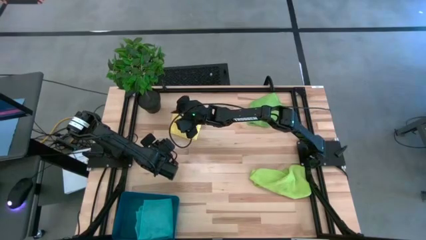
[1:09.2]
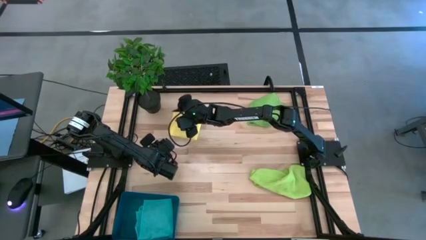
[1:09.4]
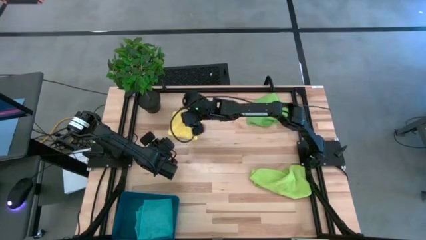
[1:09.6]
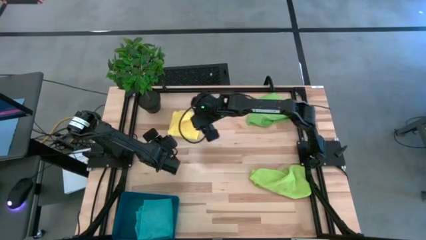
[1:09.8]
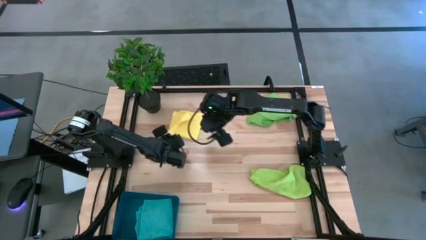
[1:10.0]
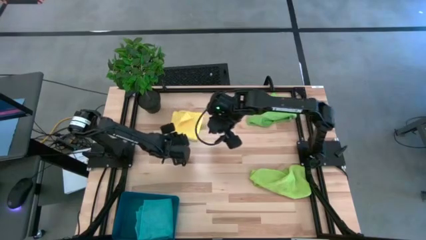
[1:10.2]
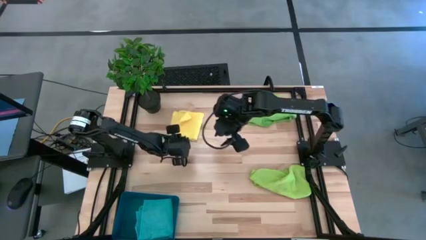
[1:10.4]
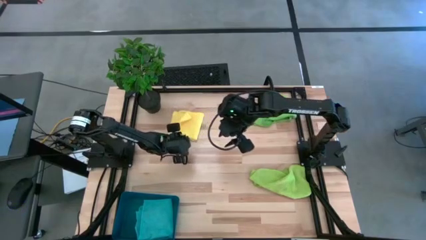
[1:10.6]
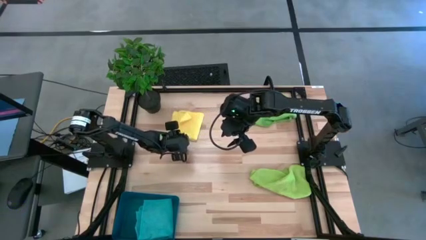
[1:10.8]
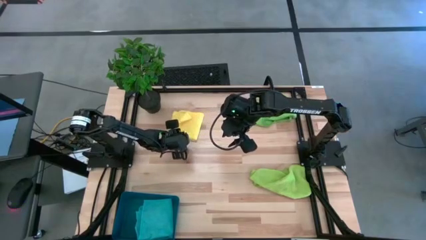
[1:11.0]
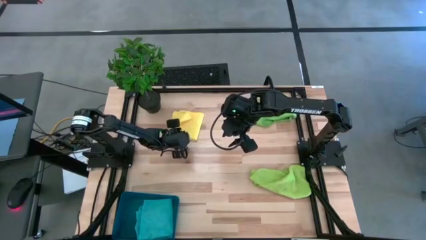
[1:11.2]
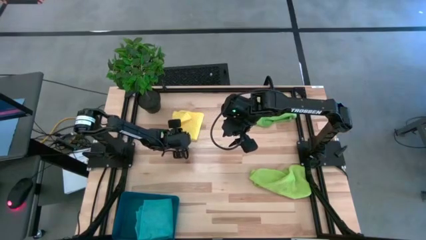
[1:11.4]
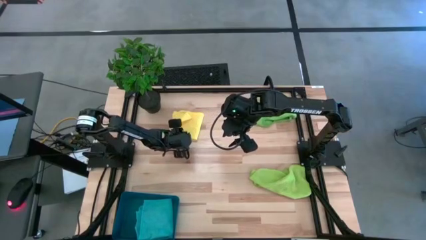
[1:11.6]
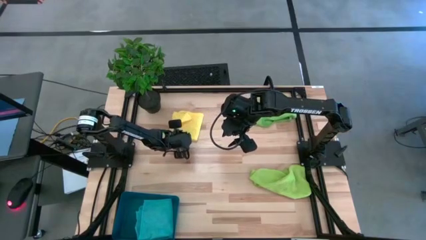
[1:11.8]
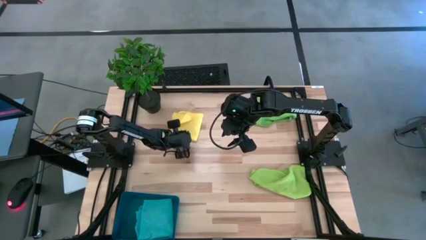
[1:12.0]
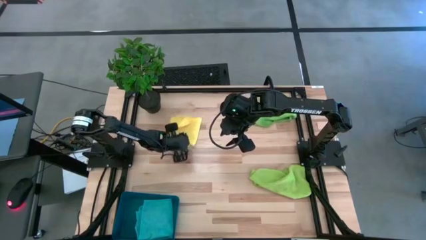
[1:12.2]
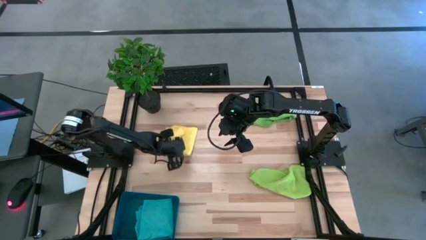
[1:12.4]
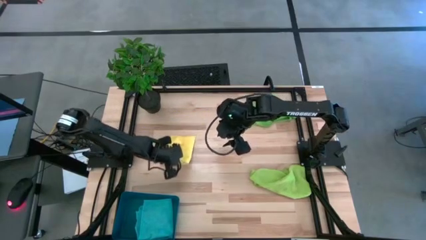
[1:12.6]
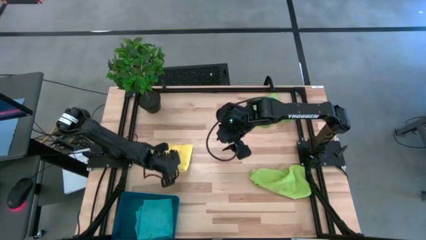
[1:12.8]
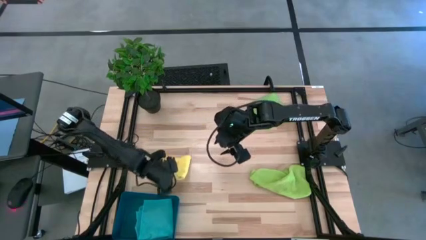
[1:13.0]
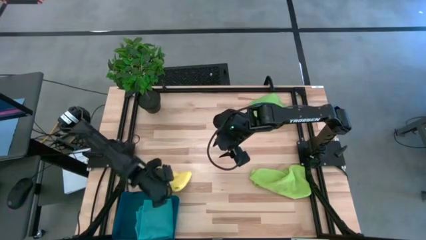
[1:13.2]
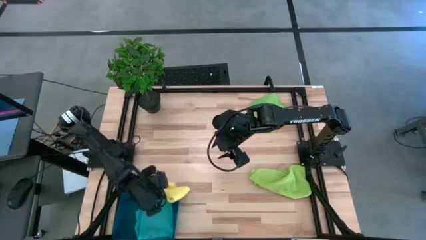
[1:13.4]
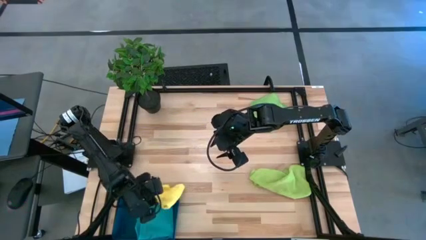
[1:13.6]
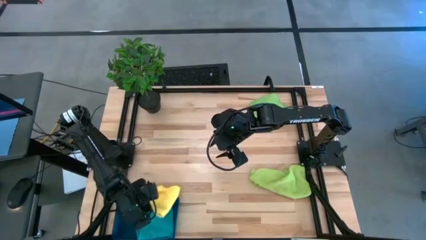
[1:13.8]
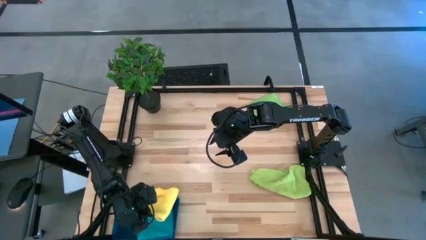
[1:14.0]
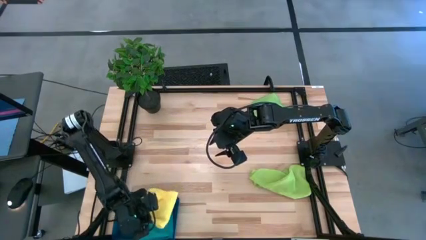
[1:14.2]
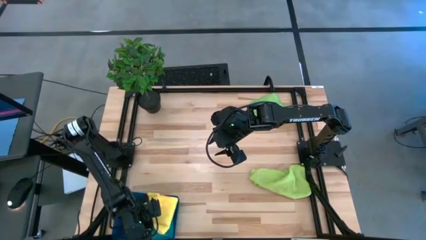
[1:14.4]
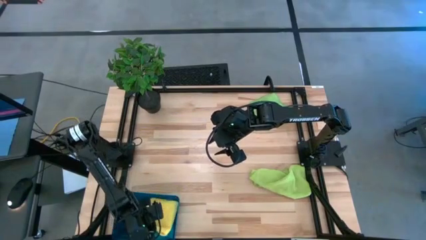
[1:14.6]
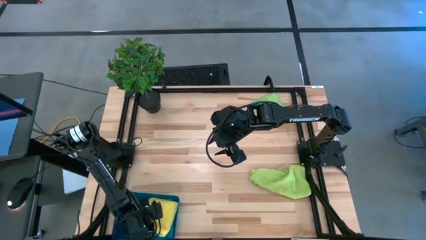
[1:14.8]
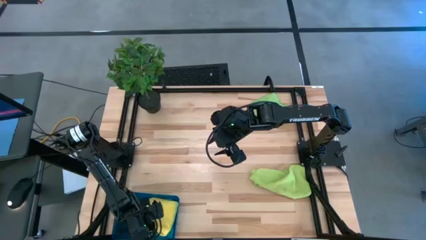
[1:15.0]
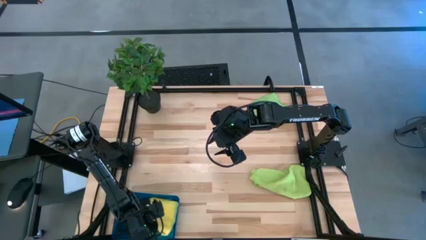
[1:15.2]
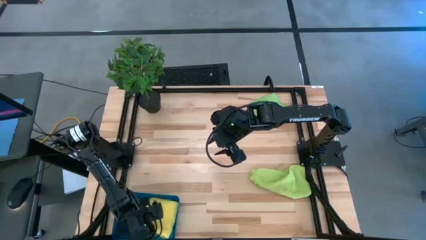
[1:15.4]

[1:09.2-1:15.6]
Task: Fold microfiber towels
Put the yellow microfiber towel into the bin

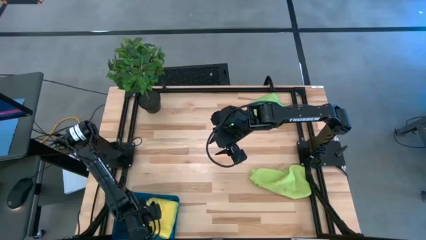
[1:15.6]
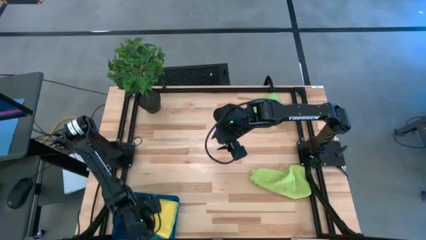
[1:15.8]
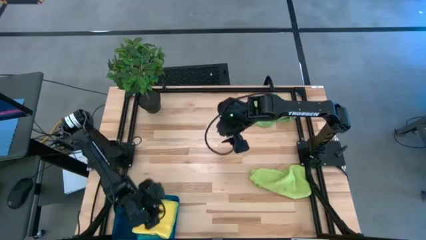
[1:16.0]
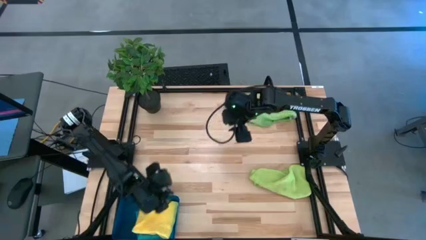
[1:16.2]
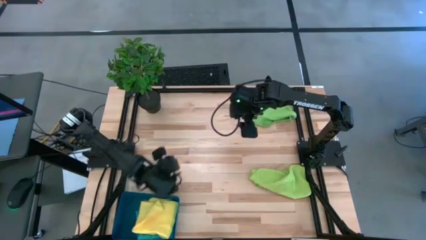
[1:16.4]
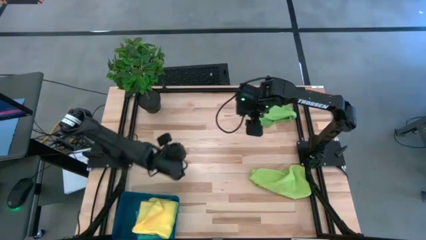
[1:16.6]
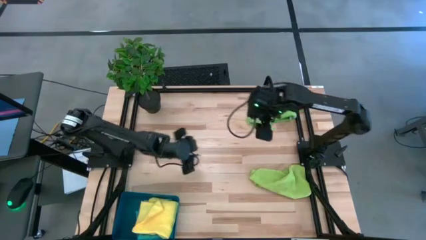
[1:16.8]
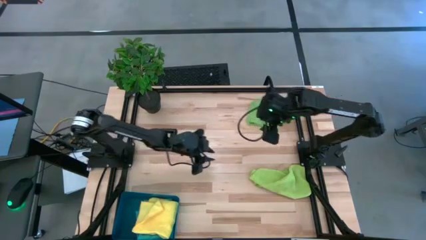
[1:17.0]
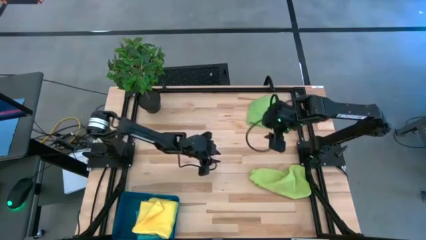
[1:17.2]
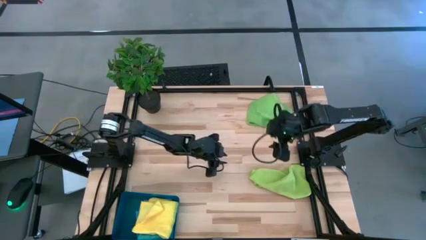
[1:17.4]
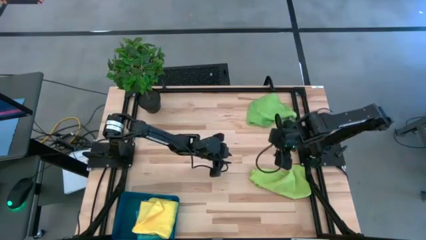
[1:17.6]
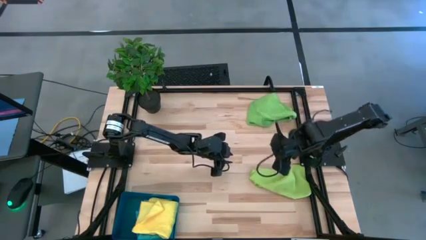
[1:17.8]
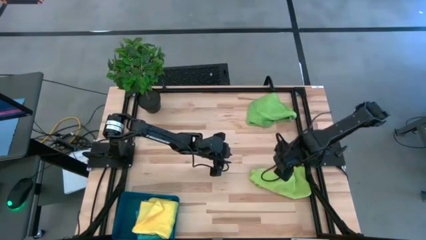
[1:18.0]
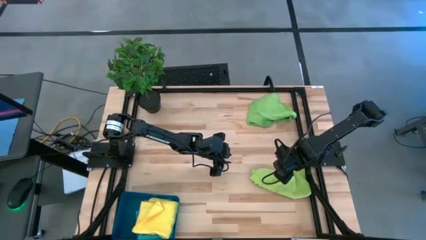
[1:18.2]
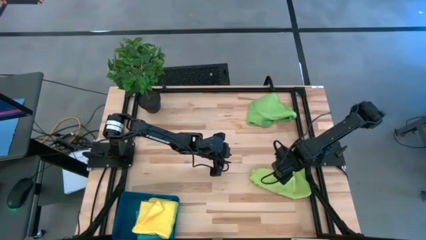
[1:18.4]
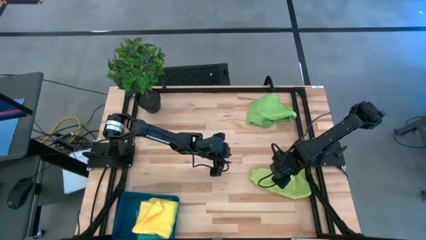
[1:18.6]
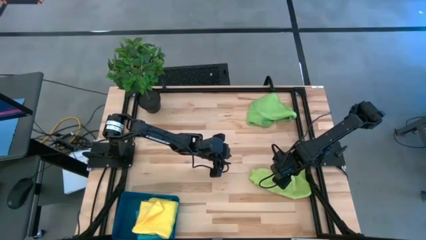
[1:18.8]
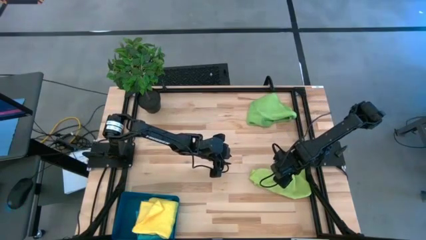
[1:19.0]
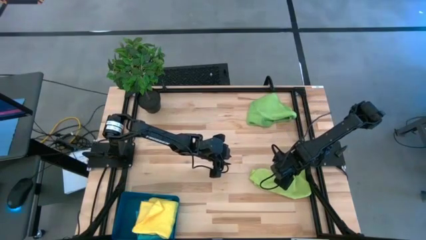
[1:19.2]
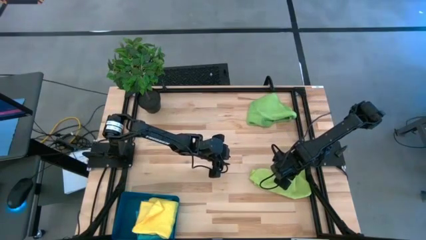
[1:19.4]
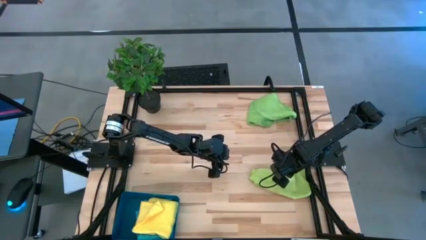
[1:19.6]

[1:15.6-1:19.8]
Fold the light green microfiber towel

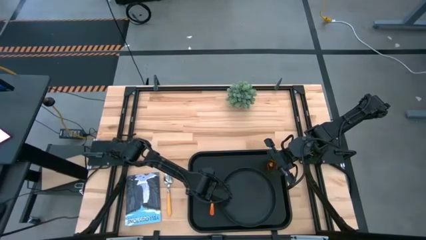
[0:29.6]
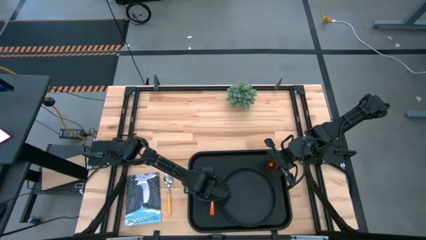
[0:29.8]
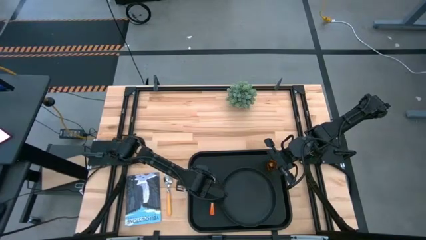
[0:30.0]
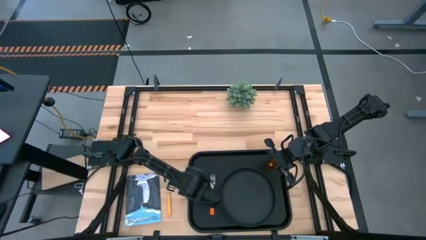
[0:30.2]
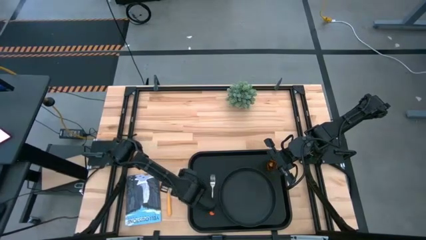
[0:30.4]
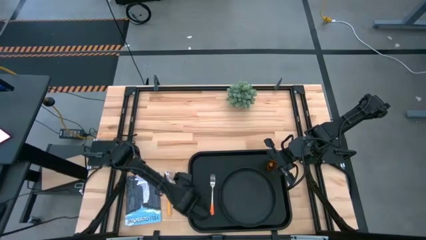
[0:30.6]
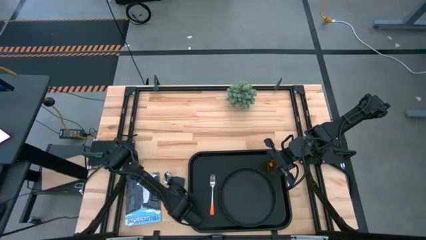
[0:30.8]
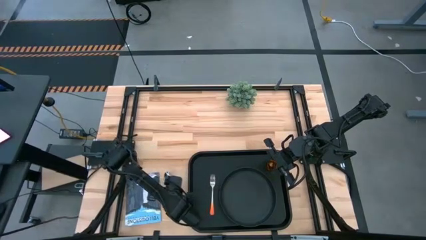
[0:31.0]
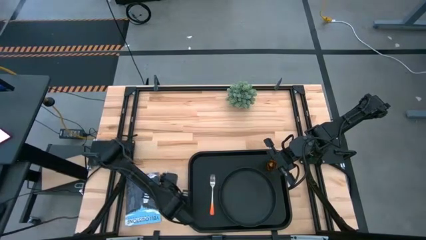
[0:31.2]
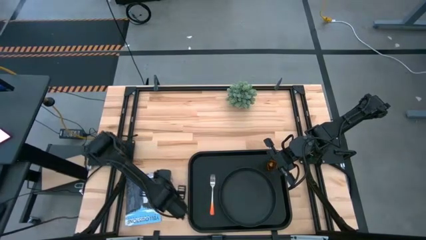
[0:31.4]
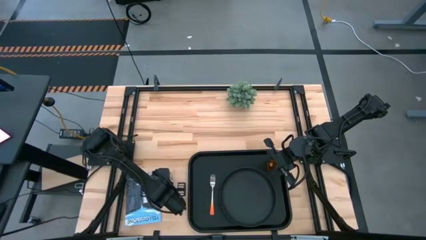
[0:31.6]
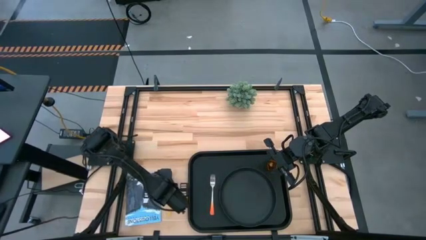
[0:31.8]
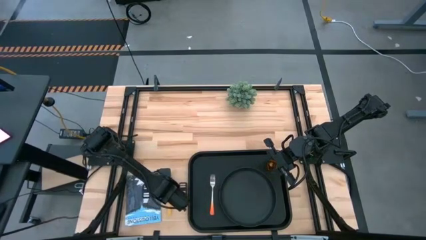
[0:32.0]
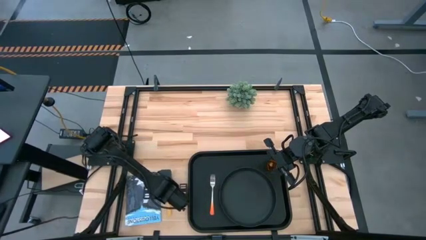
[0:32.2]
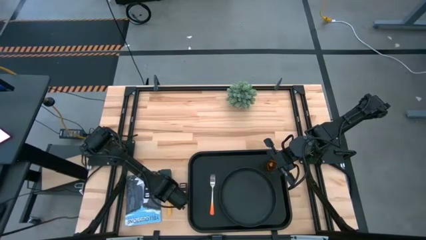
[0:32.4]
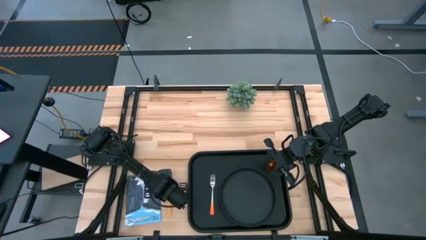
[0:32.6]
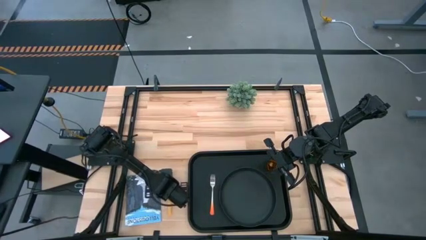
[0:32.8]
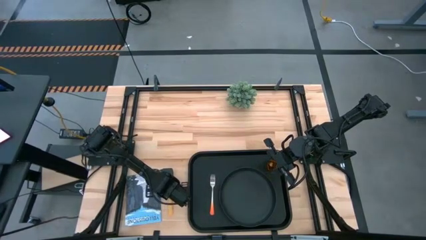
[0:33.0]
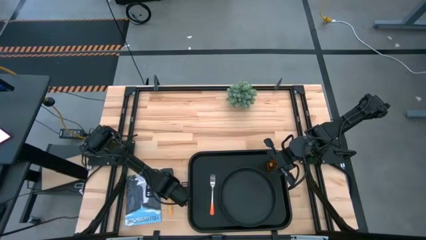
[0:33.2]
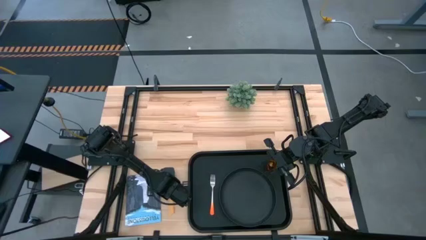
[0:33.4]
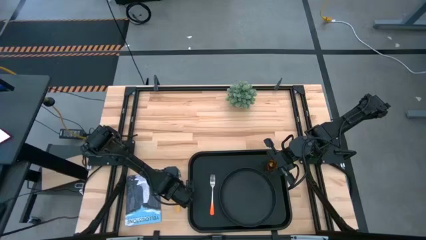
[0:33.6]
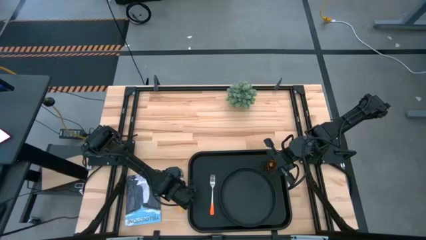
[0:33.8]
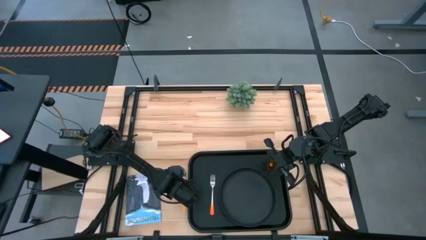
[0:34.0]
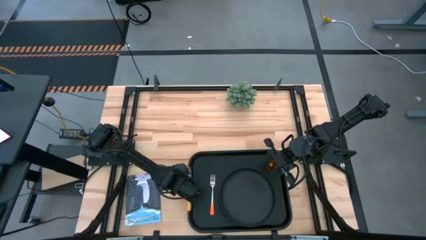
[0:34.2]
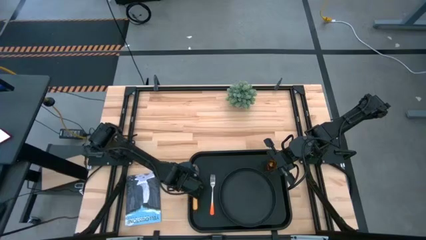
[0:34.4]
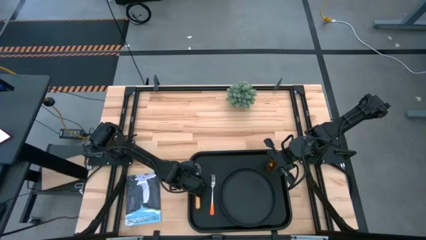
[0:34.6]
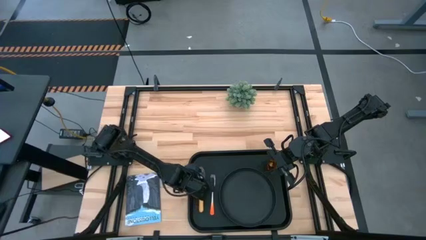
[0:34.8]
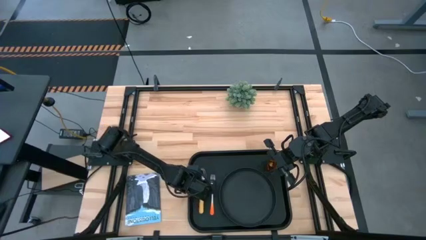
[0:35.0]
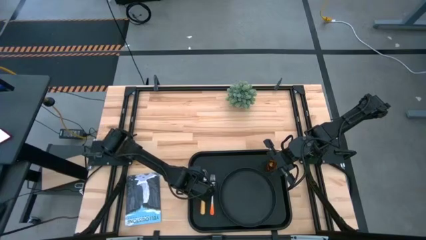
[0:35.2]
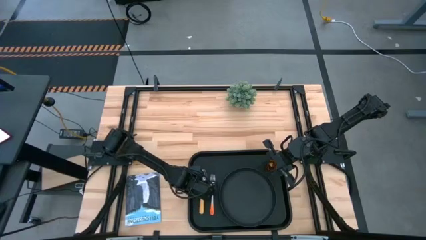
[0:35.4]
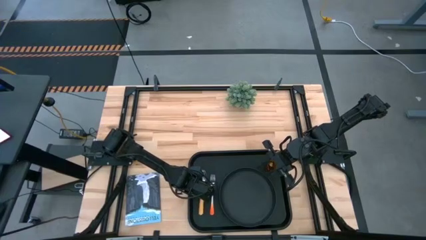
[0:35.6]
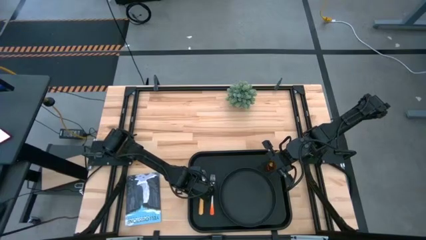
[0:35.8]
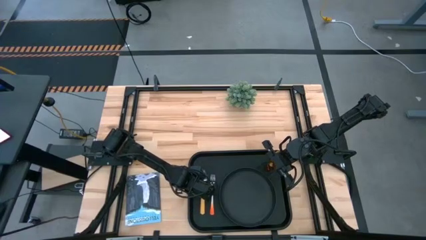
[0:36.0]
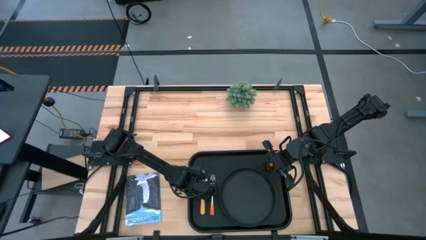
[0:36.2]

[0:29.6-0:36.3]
Task: Pick and place plate/cup/fork/spoon on tray
Put the yellow spoon on the black tray to the left of the orange fork
